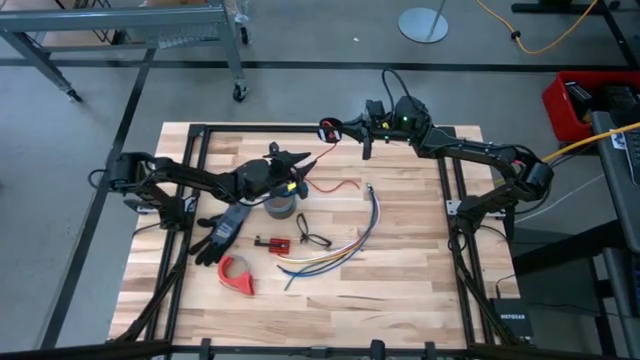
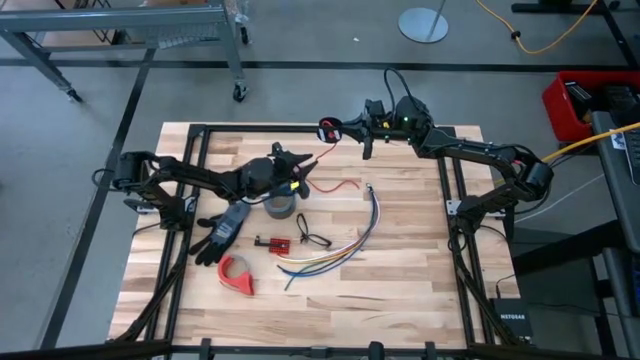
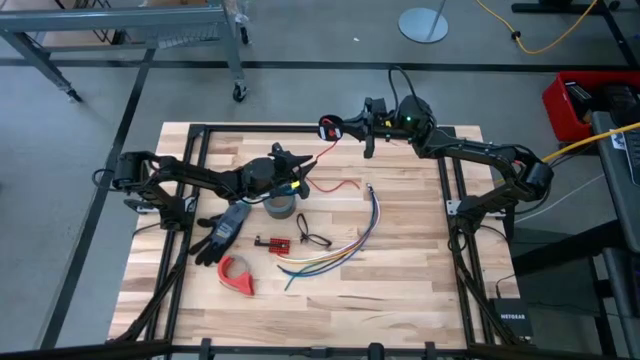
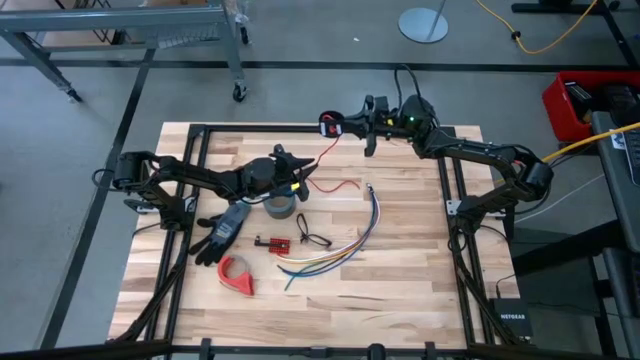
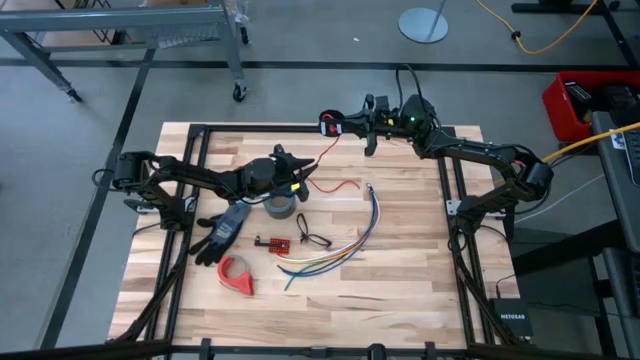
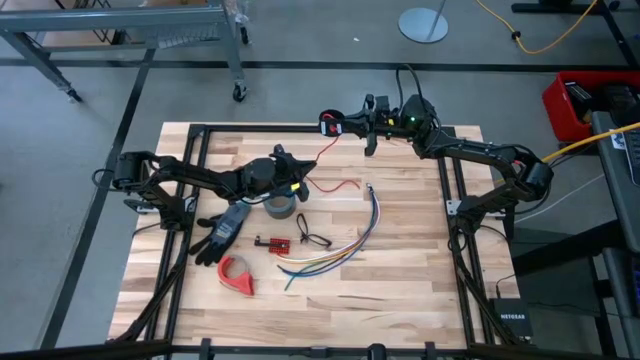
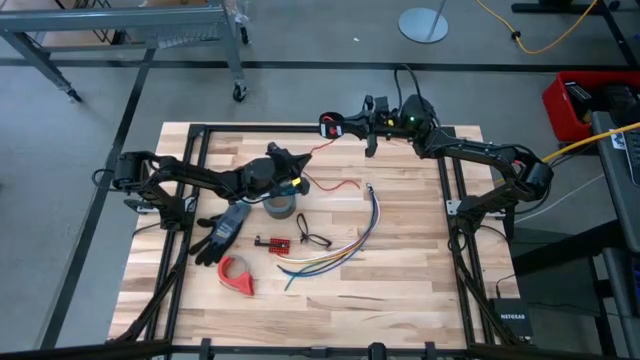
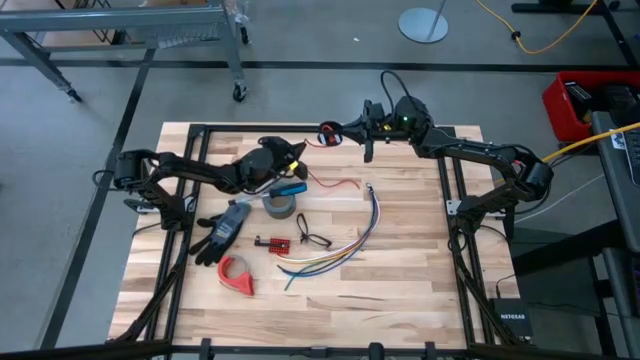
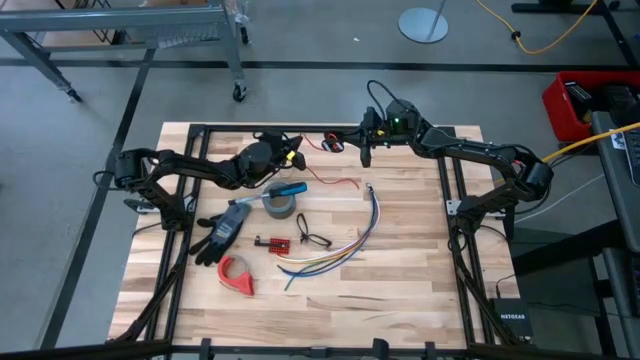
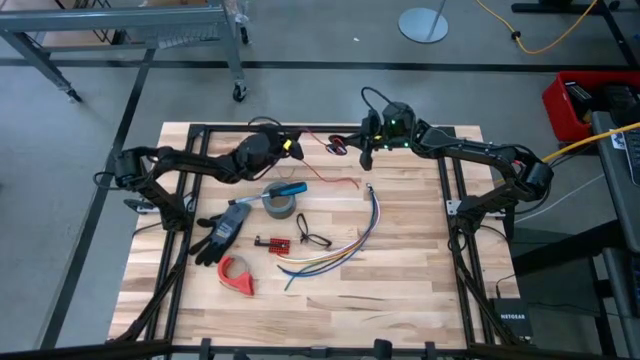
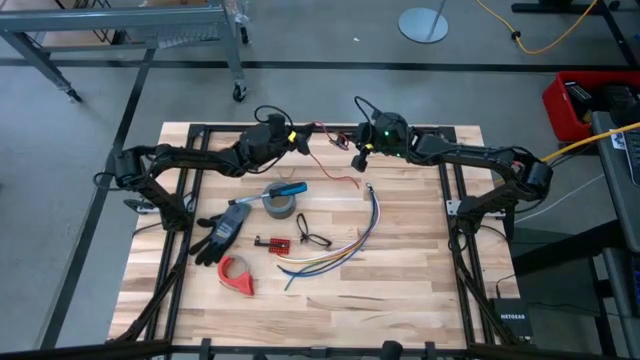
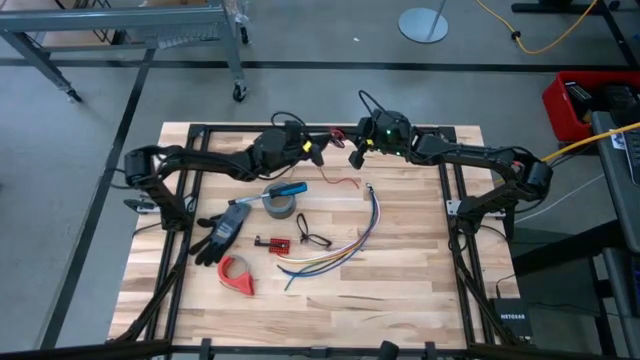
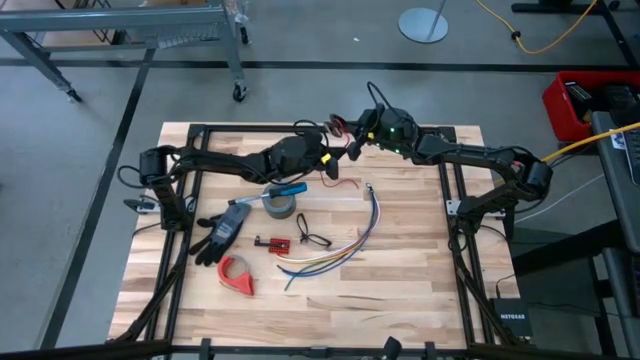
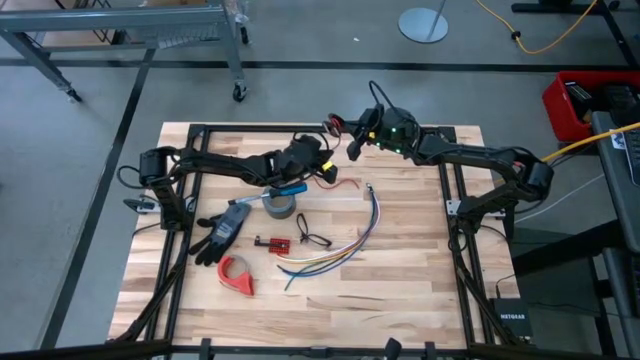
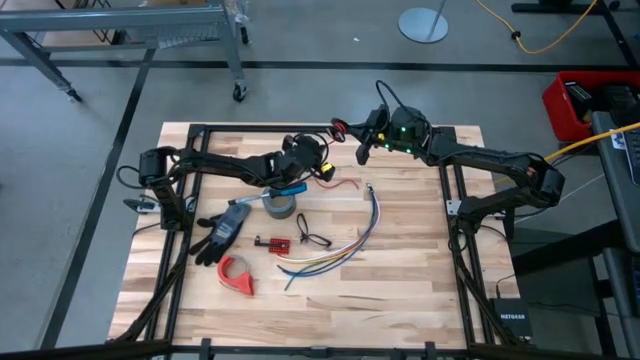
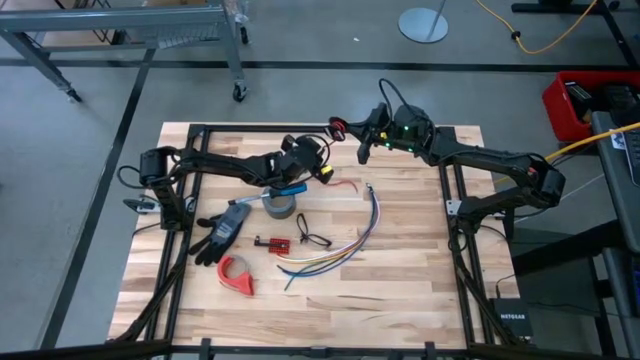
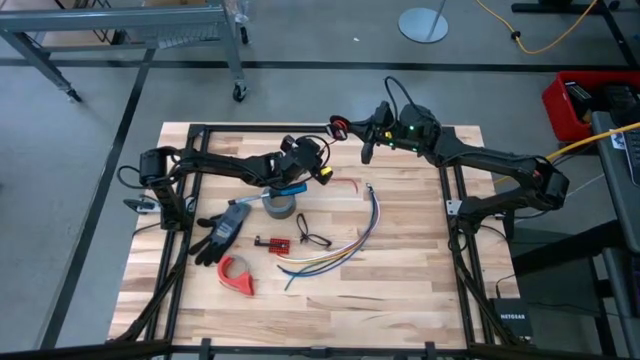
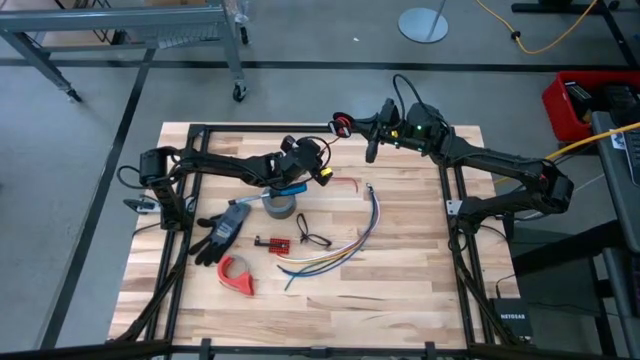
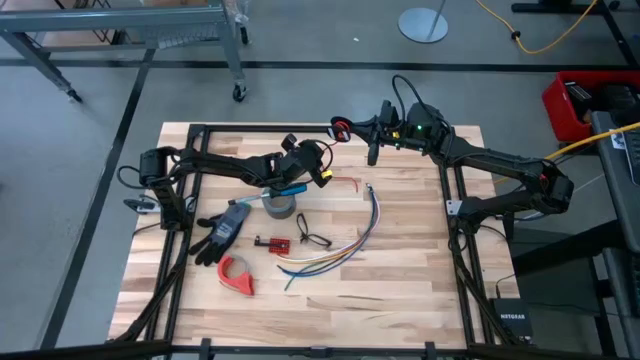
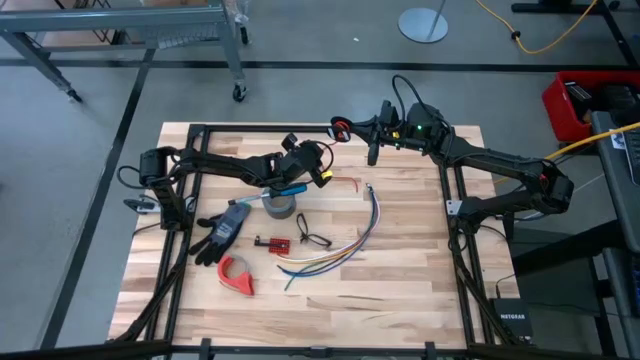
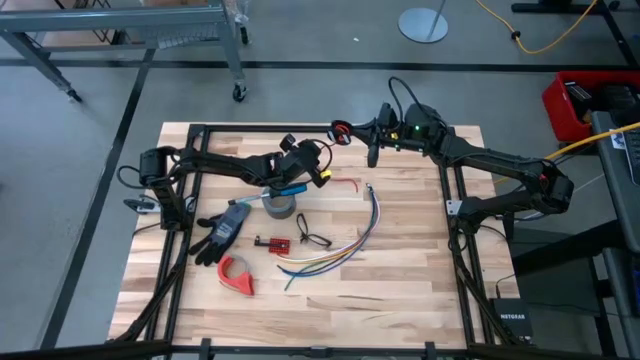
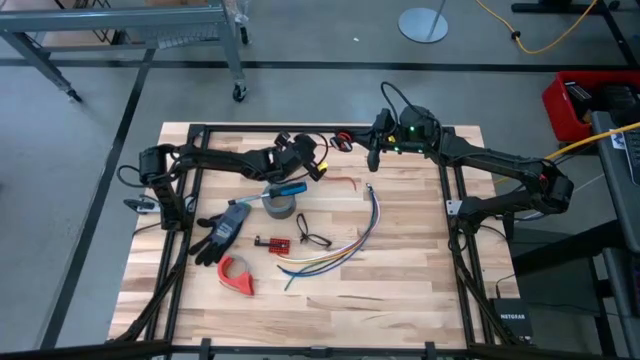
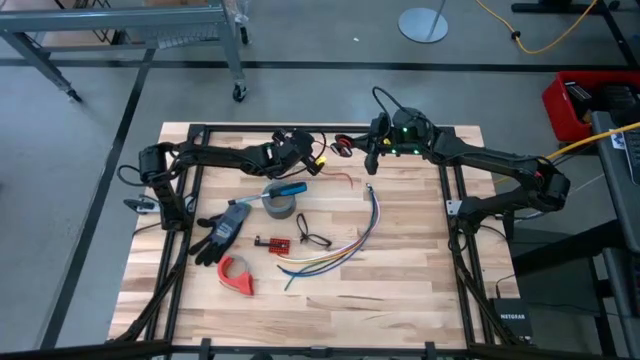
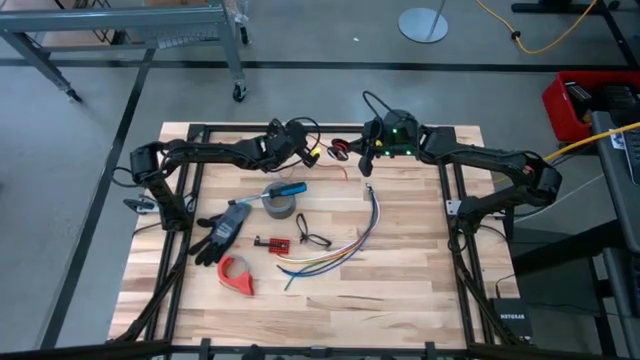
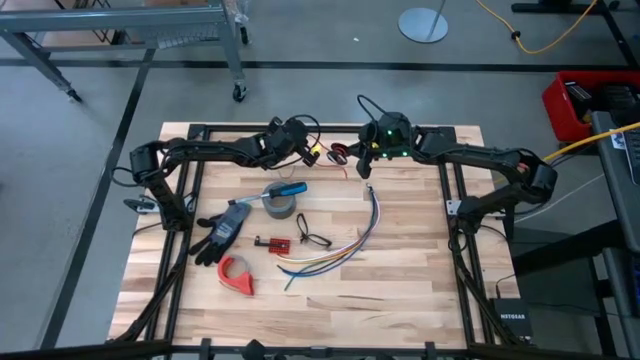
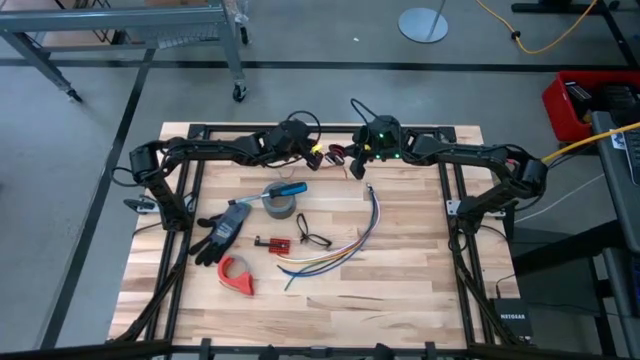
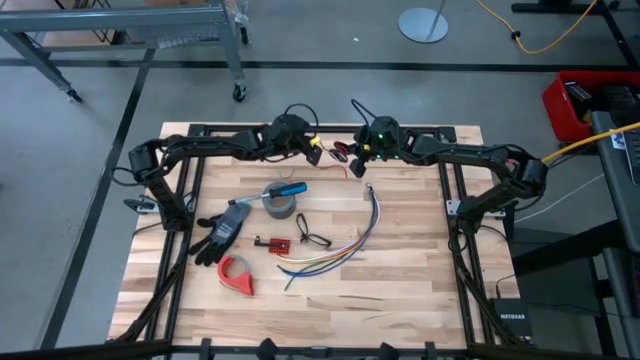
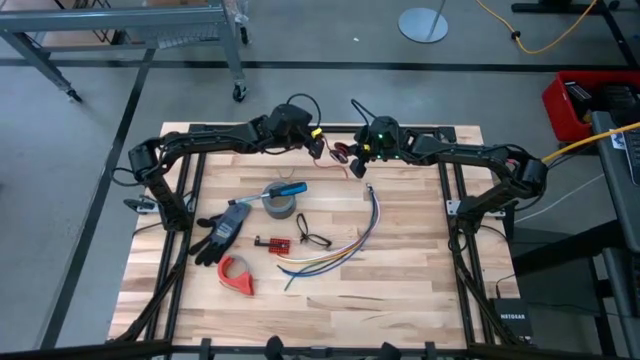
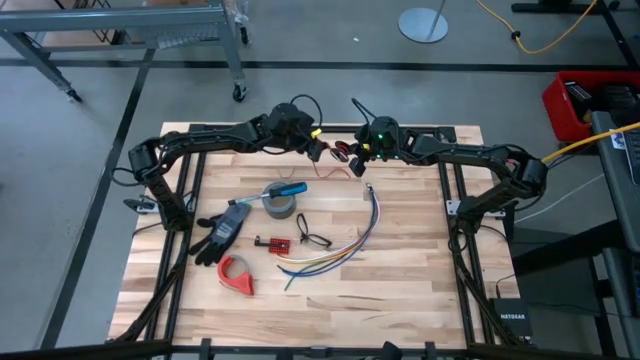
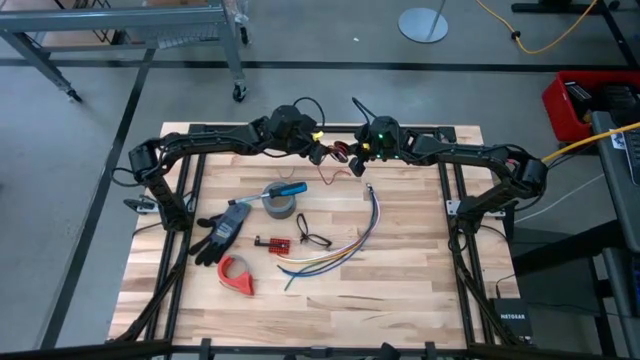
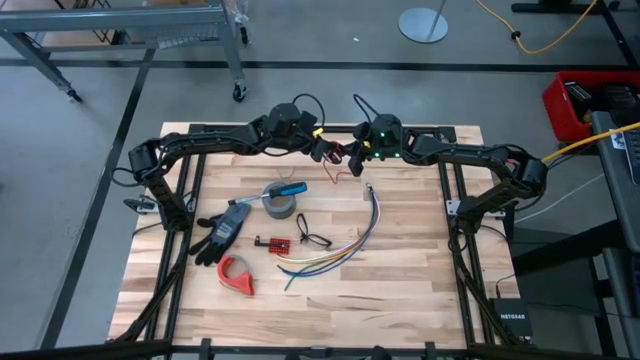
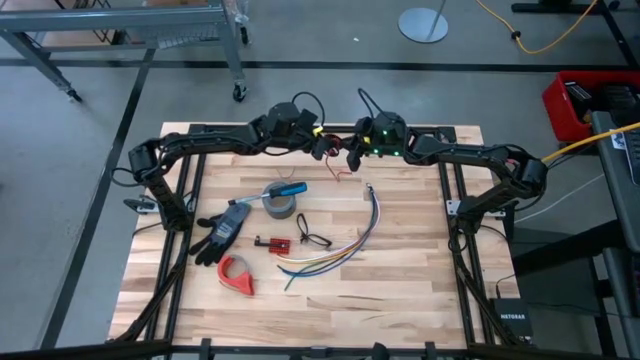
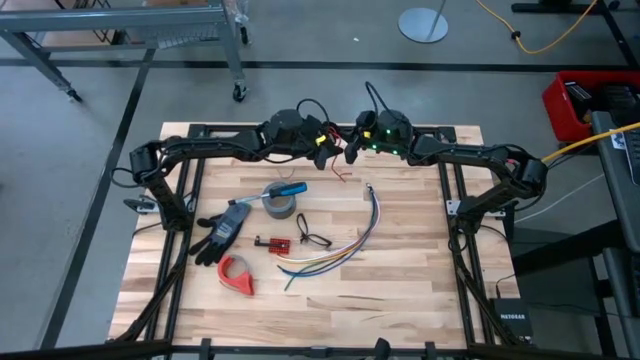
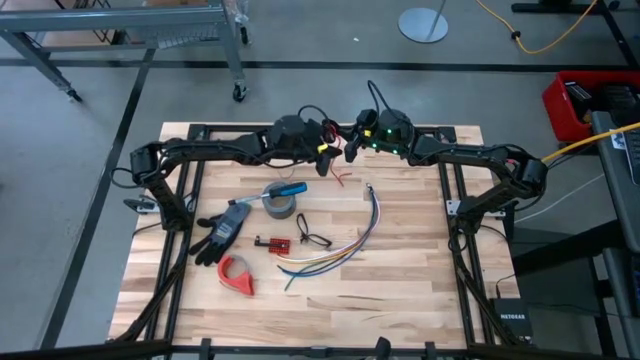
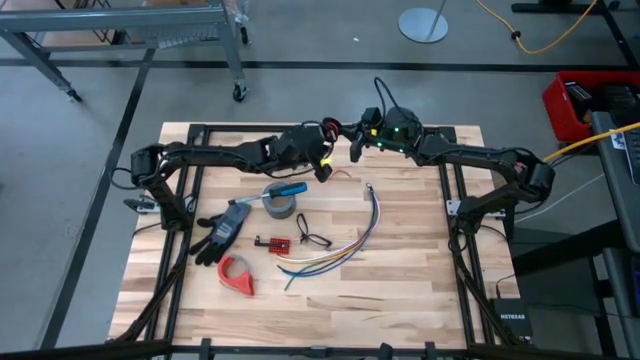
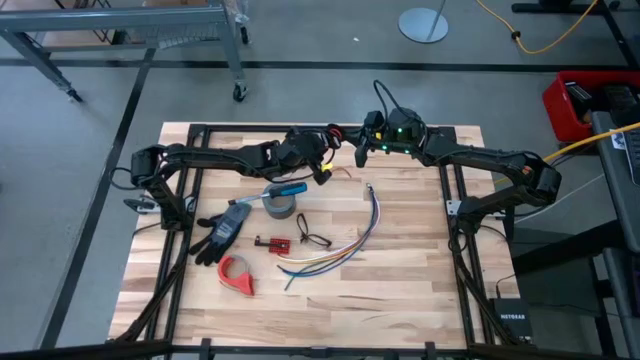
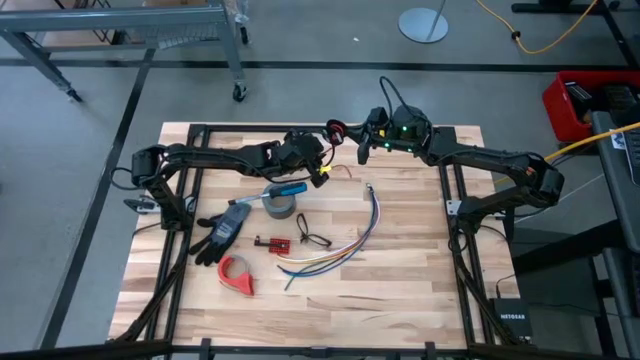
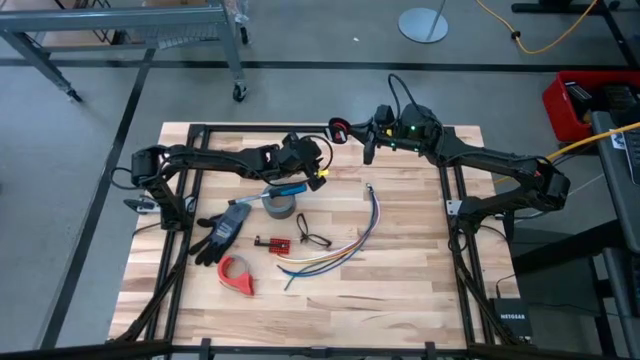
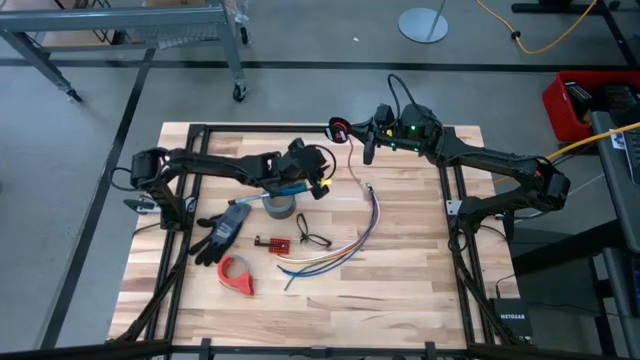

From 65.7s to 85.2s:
Task: Coil cords
Coil the red wire on the spool
